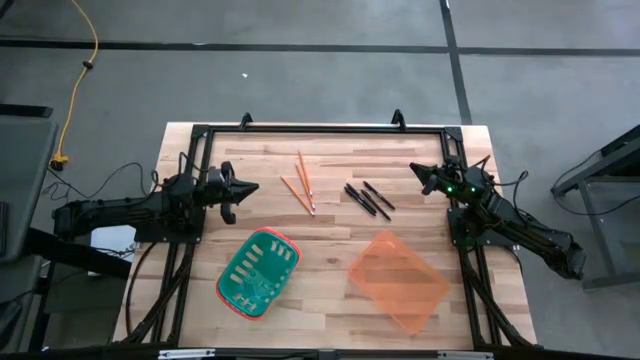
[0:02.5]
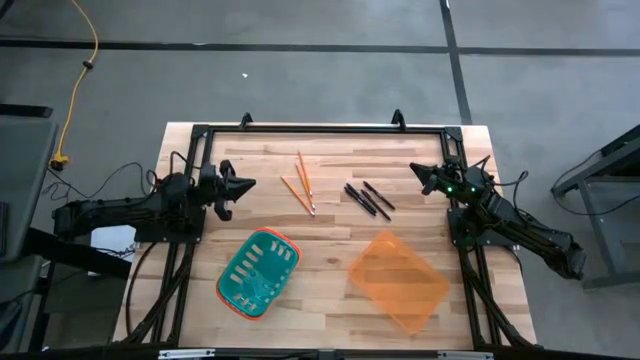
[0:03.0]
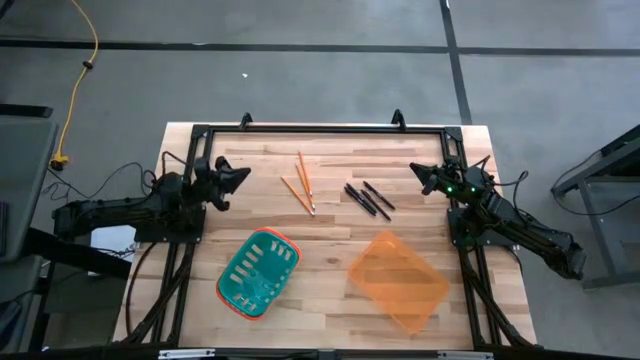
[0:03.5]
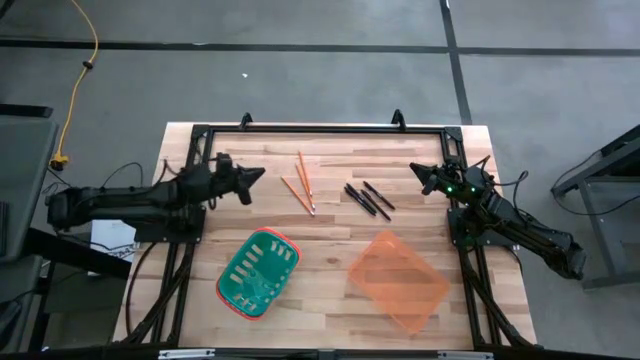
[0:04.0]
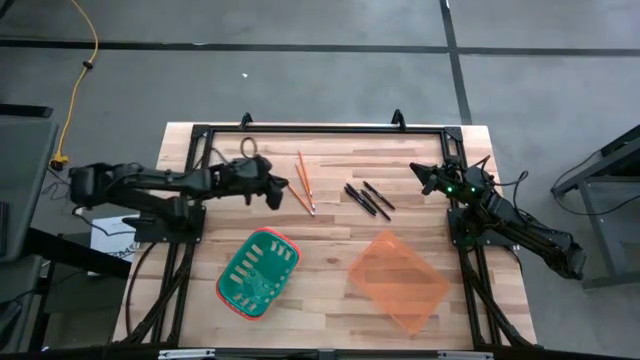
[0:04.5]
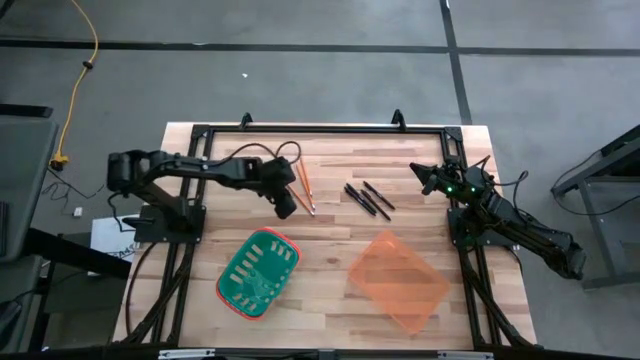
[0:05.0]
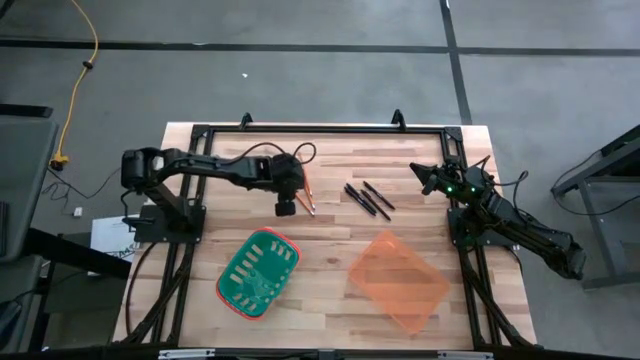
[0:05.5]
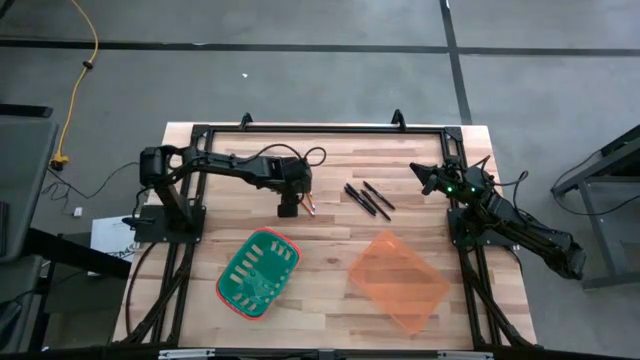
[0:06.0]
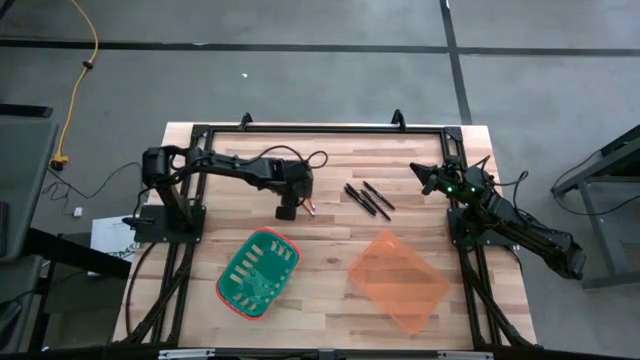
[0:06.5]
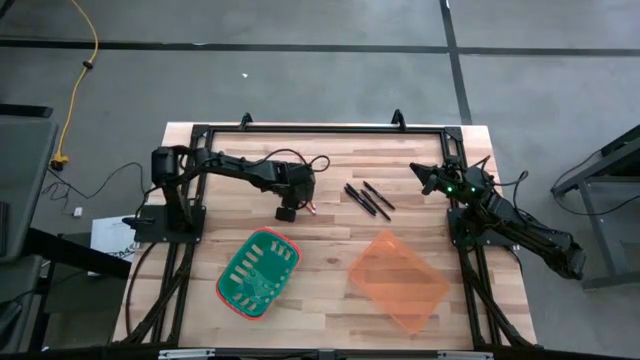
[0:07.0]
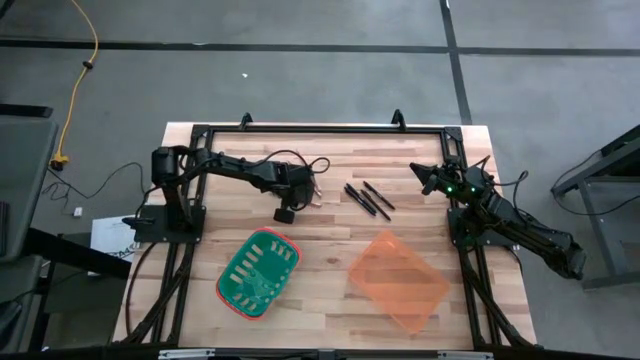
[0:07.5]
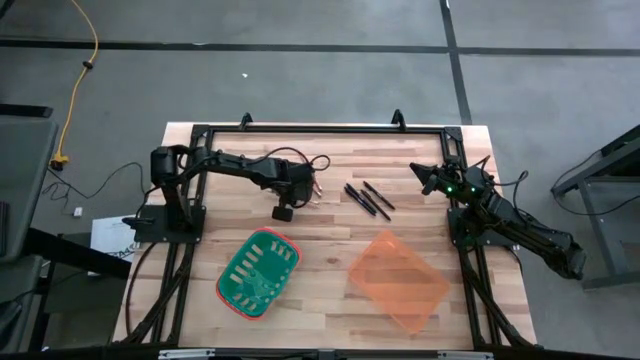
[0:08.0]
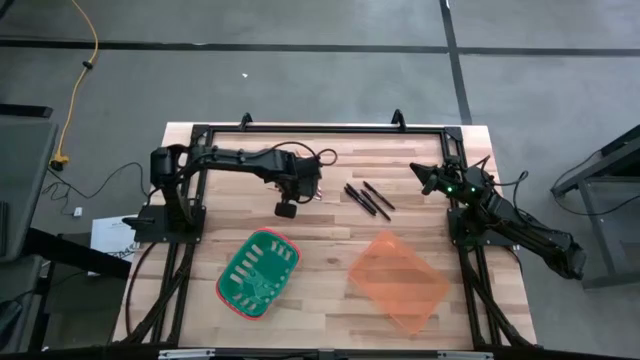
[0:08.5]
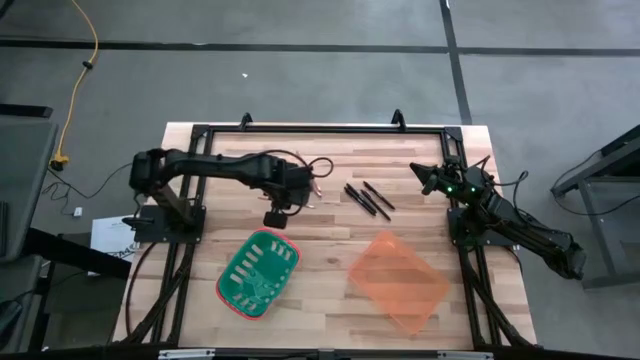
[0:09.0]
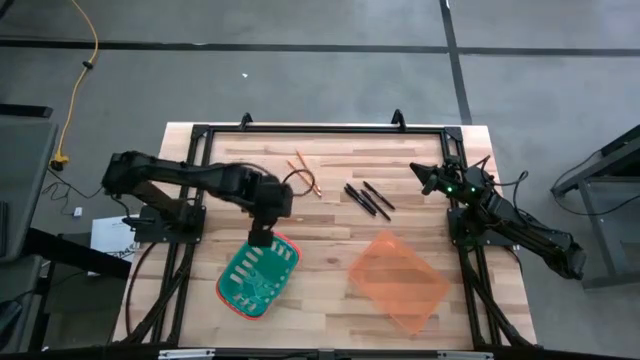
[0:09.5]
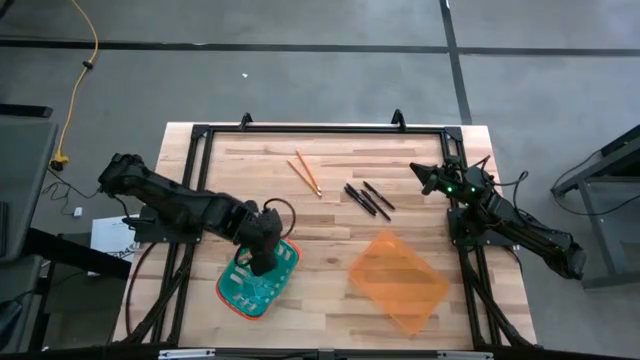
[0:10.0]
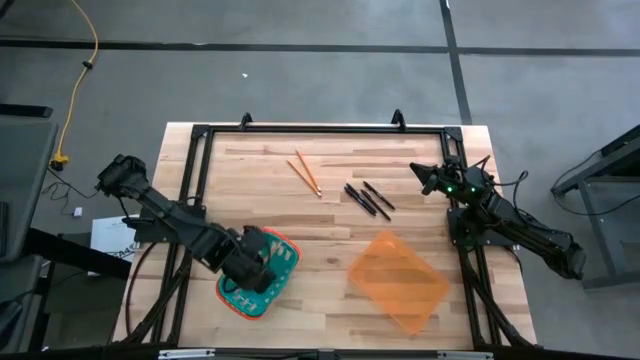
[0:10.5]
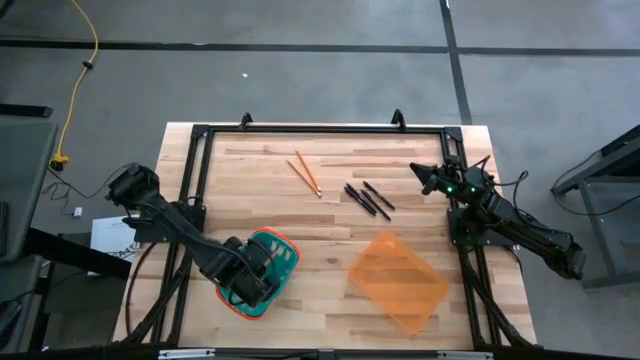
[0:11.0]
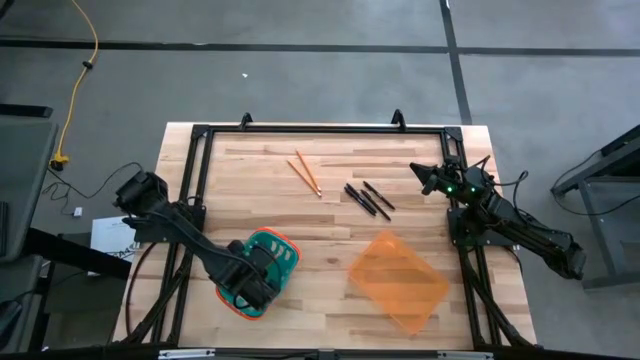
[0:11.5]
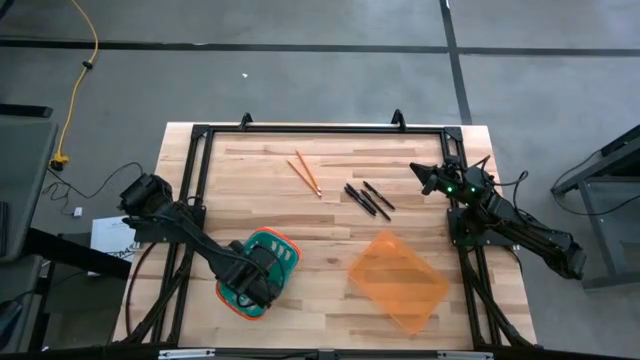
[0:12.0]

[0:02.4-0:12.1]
Task: Sort pens & pencils
Put the yellow pencil into the green bin

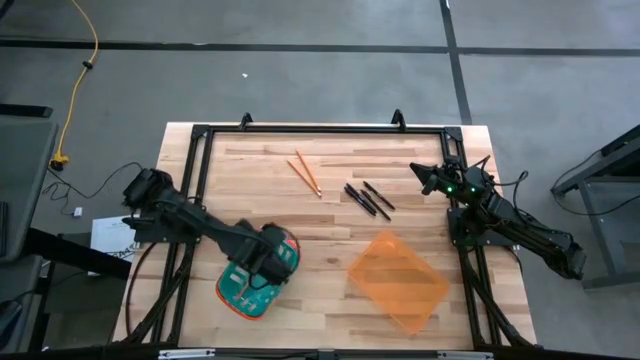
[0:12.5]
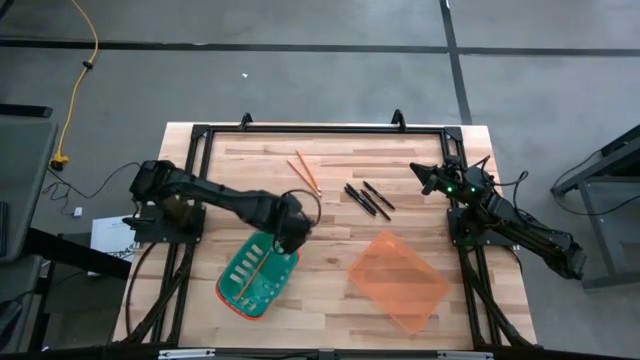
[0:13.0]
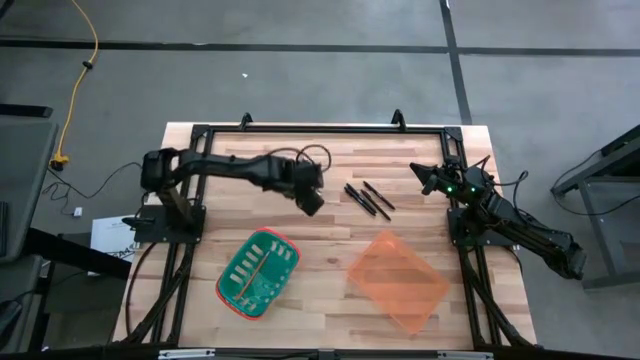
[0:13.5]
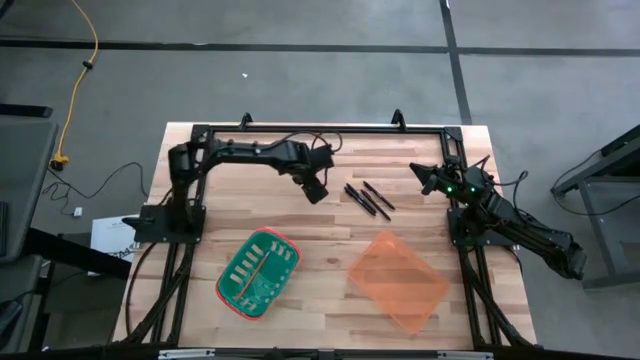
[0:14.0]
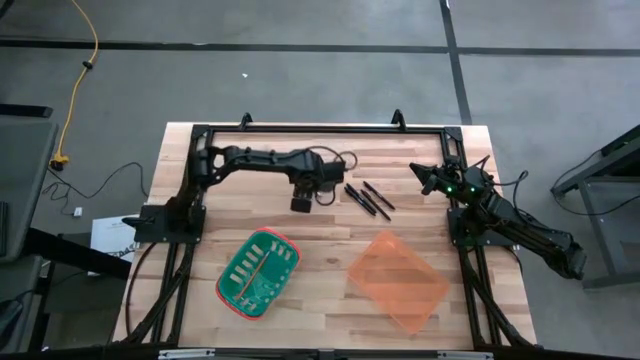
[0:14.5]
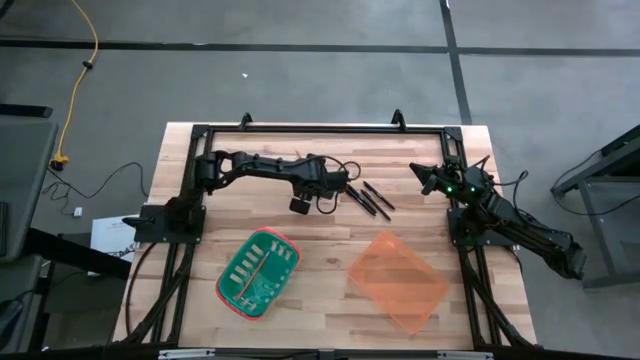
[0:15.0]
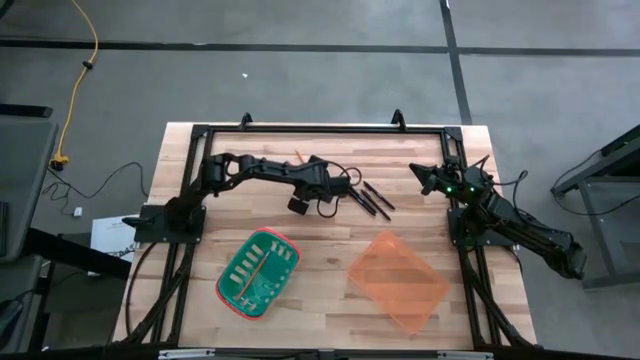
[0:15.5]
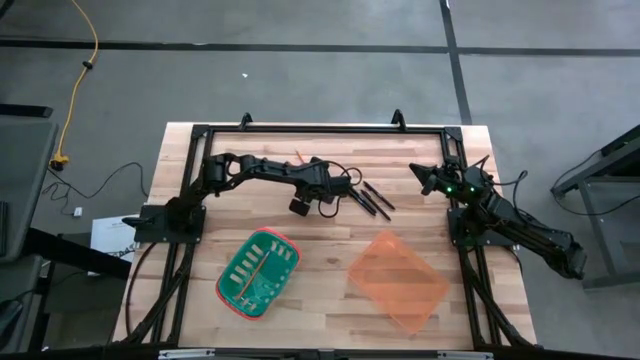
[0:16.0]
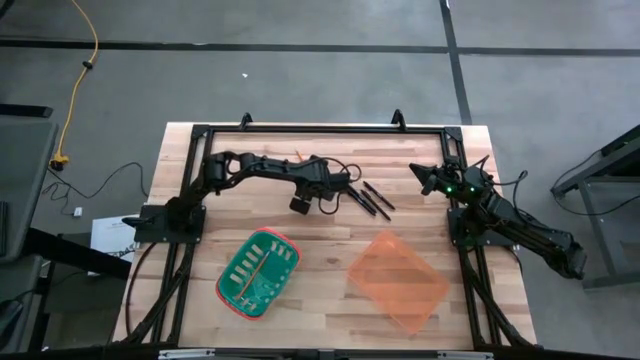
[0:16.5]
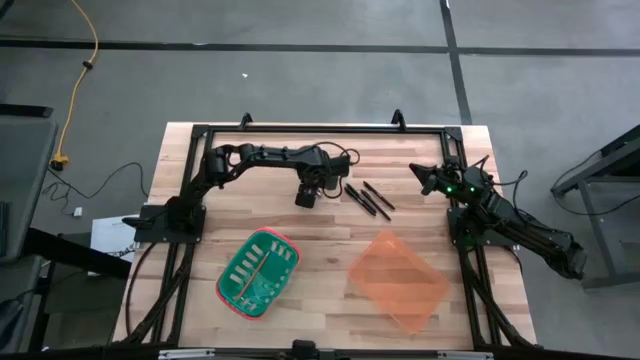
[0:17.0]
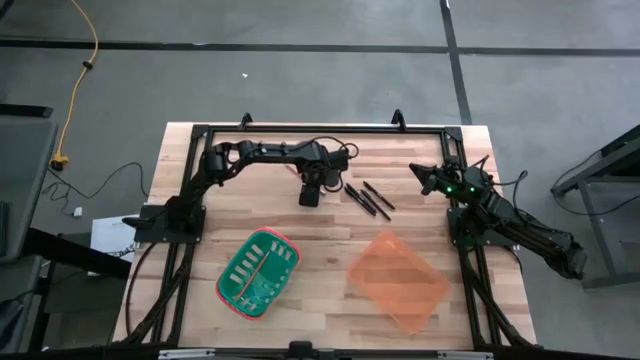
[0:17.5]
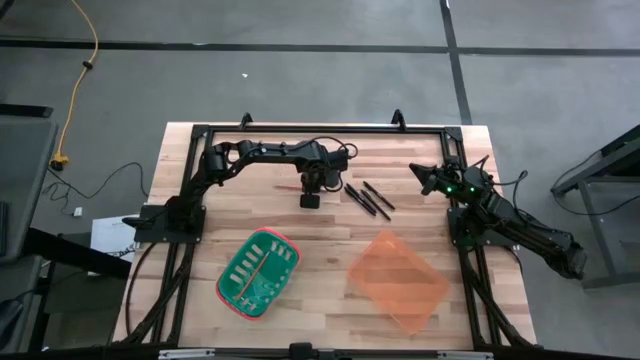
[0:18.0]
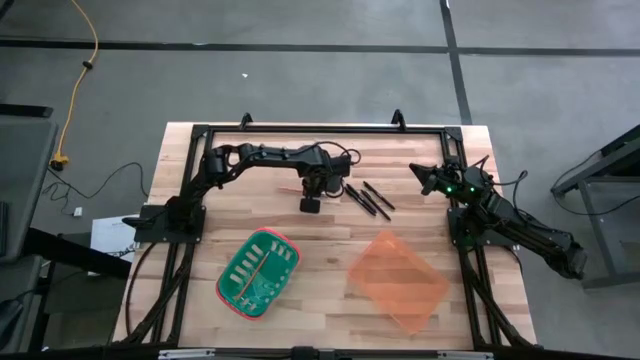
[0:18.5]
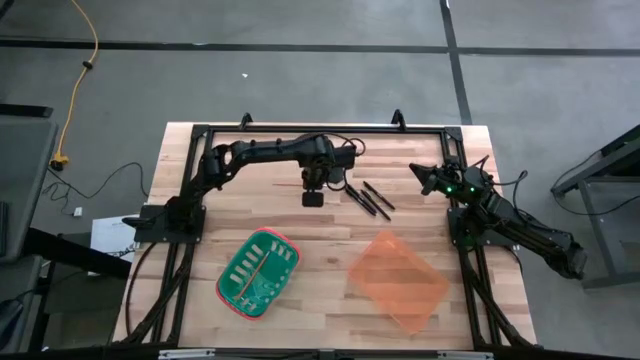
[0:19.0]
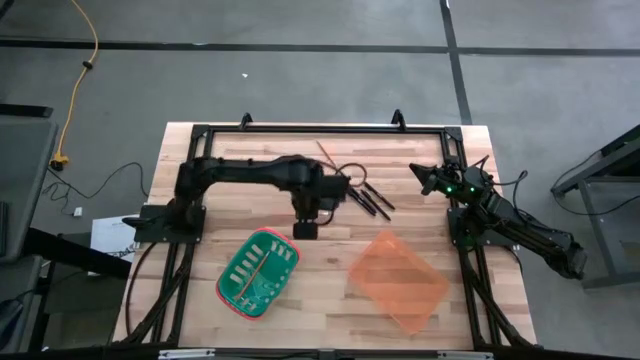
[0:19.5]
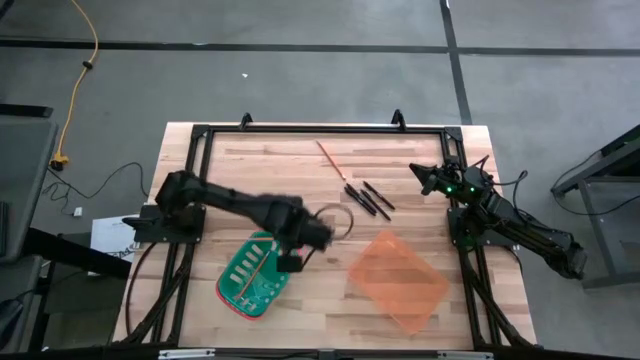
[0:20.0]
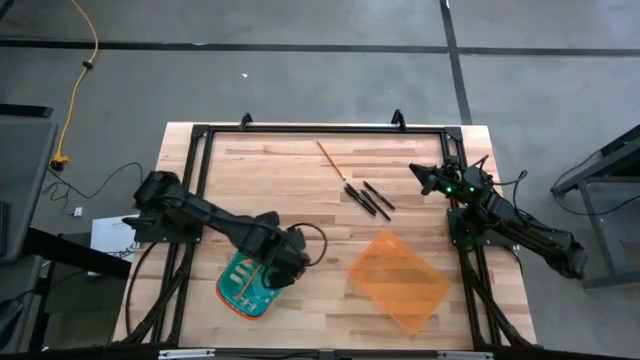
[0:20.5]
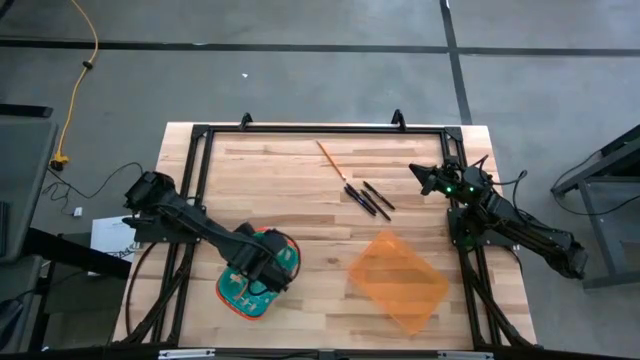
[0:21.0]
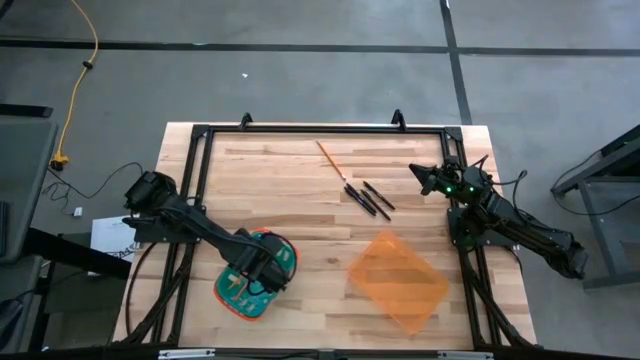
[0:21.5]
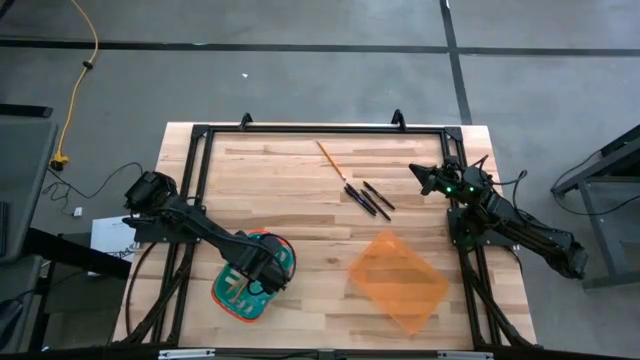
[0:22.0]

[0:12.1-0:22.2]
Put the yellow pencil into the green bin

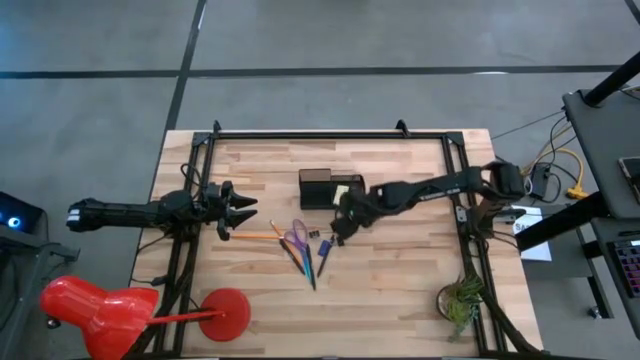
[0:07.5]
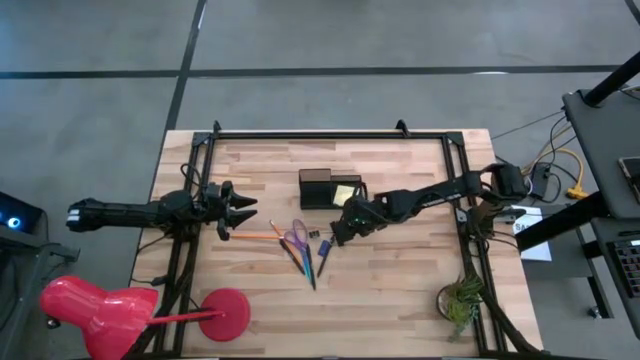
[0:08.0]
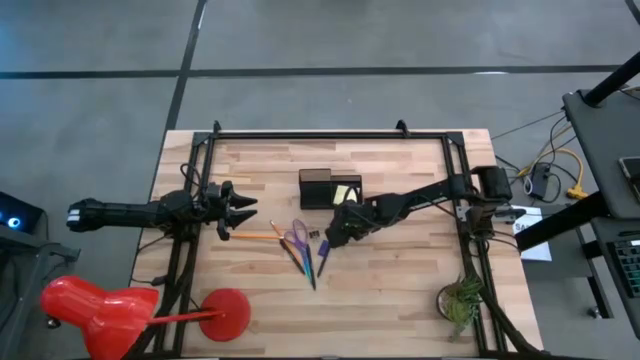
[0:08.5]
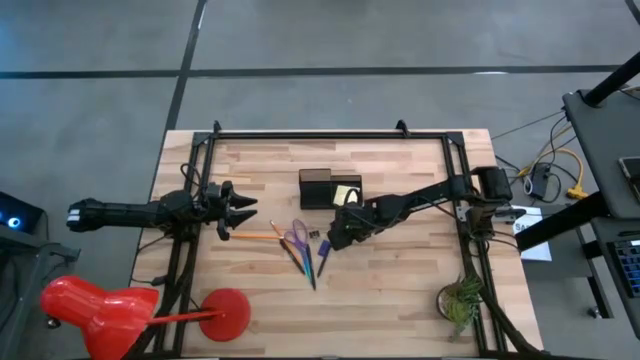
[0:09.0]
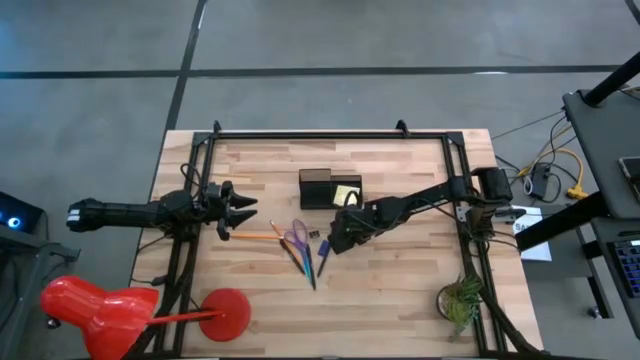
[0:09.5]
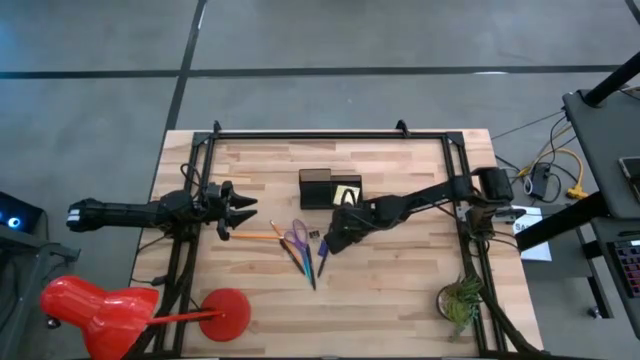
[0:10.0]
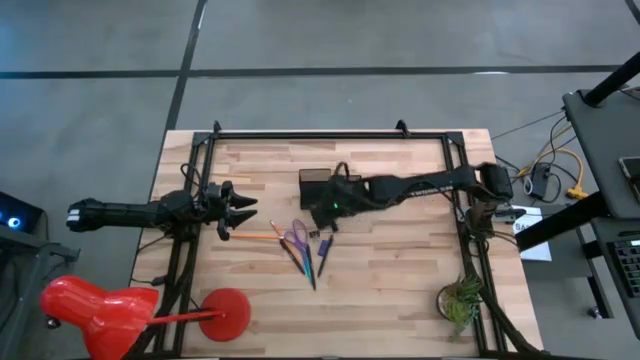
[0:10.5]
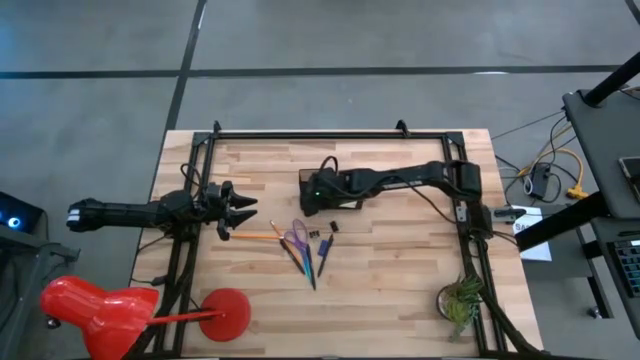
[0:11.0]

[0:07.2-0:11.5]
Task: Pick and place office supplies into organizer
Put the bottom black binder clip into the black desk organizer
